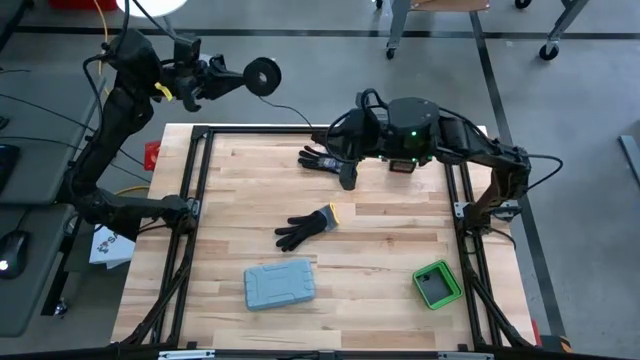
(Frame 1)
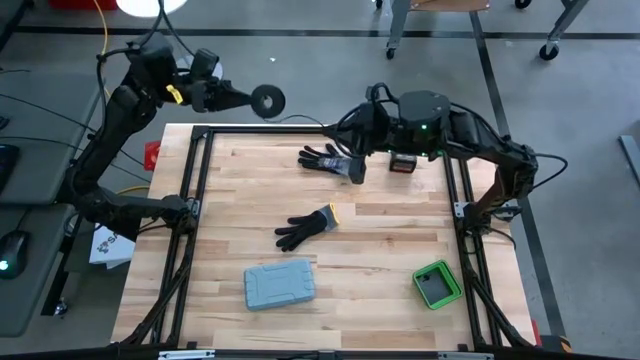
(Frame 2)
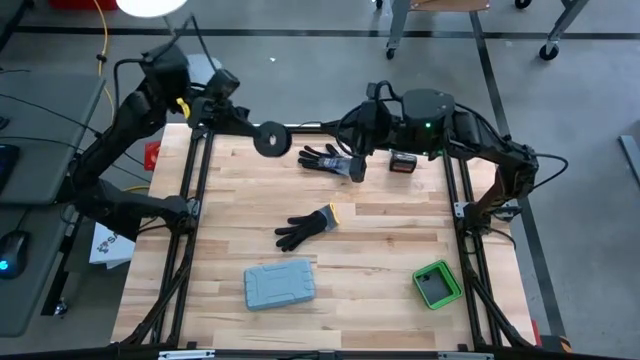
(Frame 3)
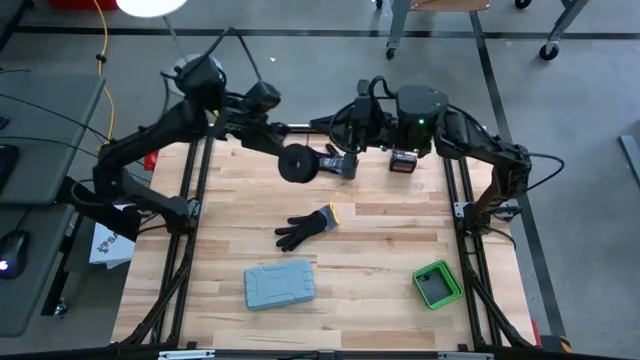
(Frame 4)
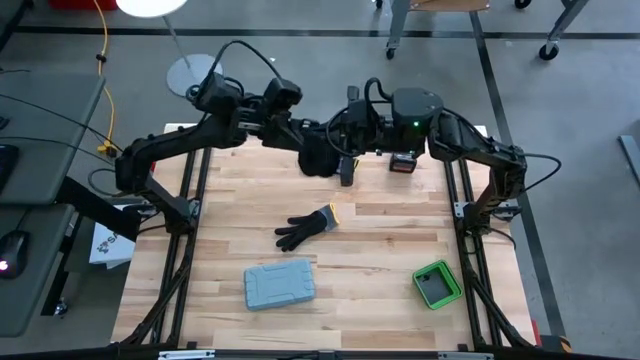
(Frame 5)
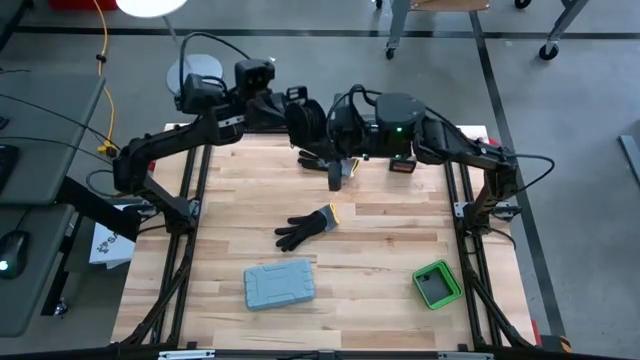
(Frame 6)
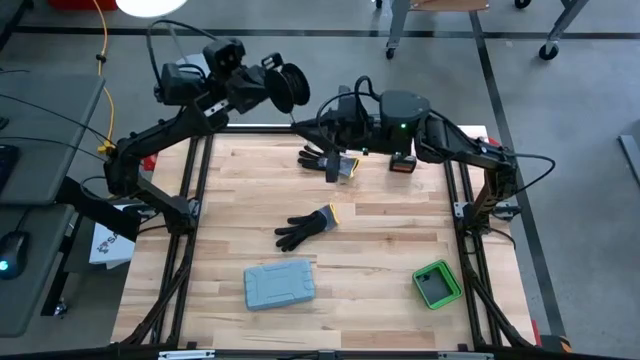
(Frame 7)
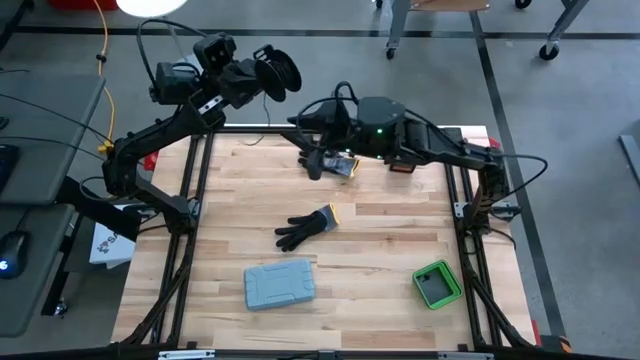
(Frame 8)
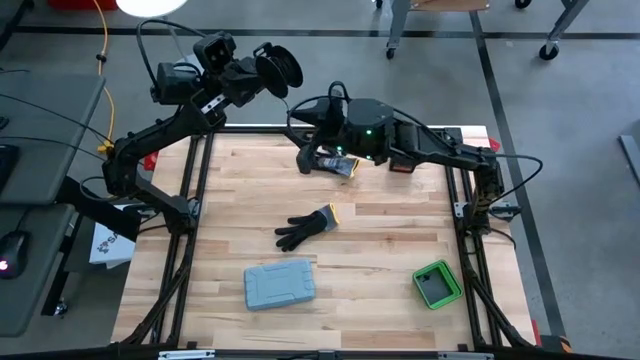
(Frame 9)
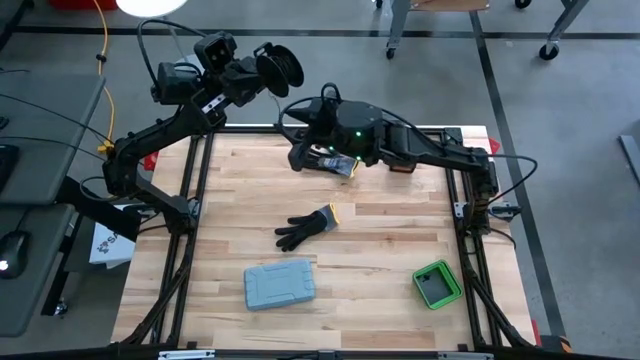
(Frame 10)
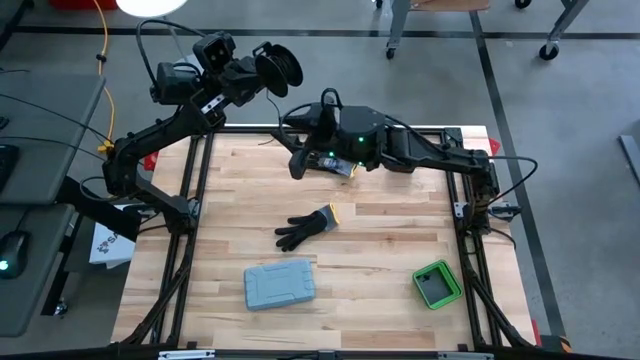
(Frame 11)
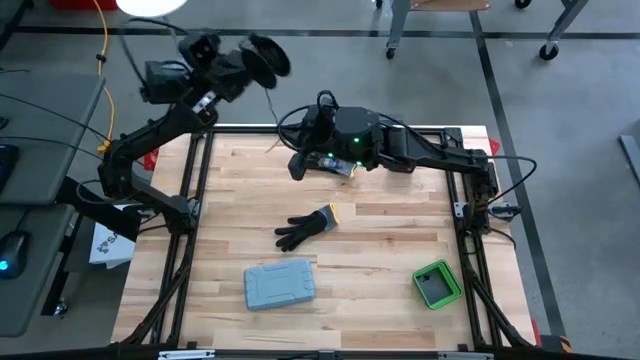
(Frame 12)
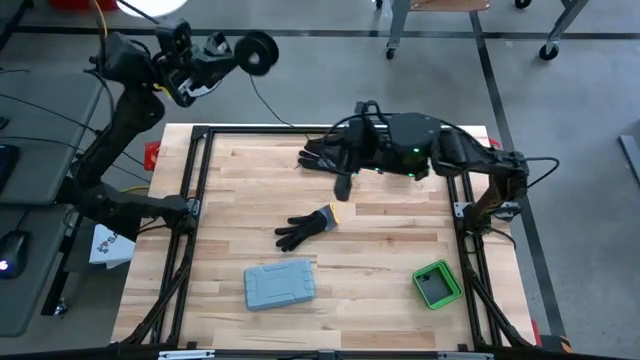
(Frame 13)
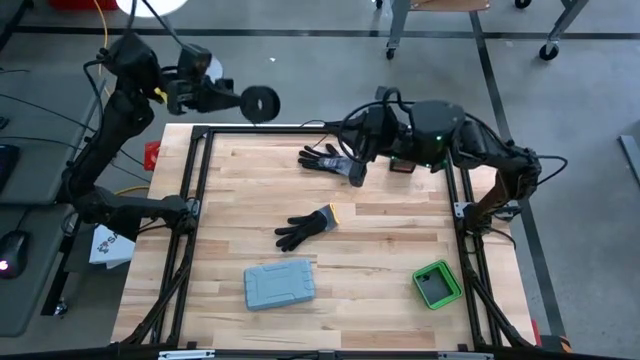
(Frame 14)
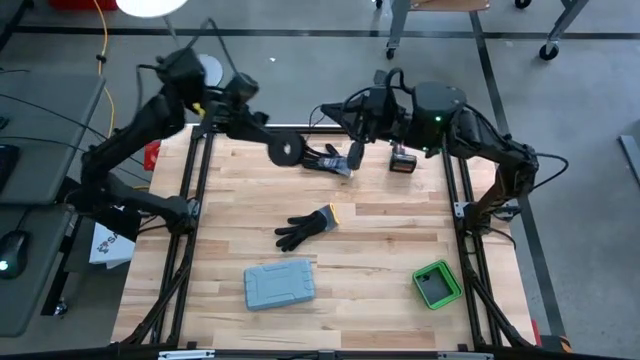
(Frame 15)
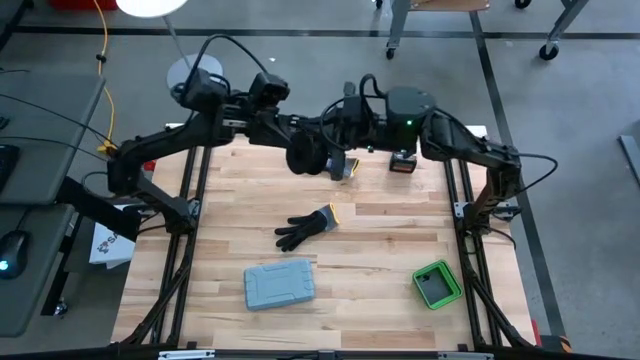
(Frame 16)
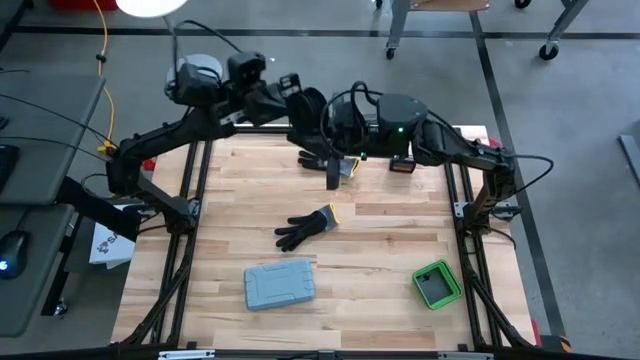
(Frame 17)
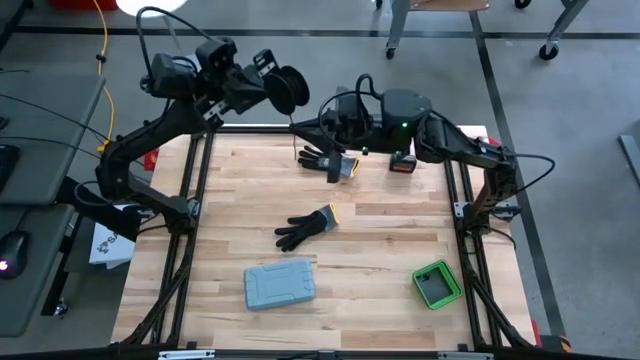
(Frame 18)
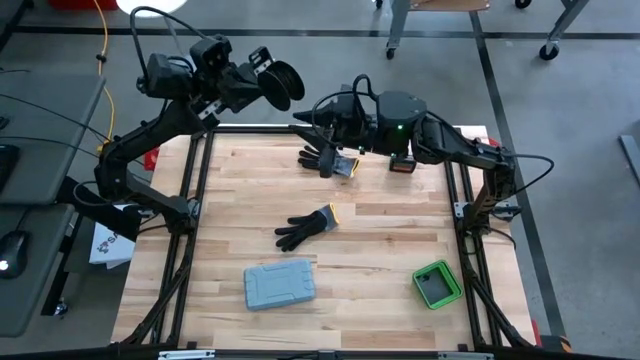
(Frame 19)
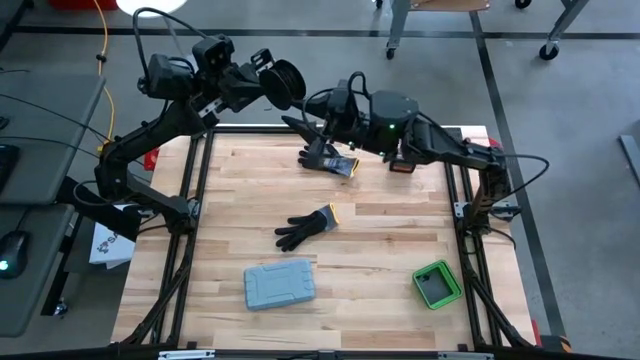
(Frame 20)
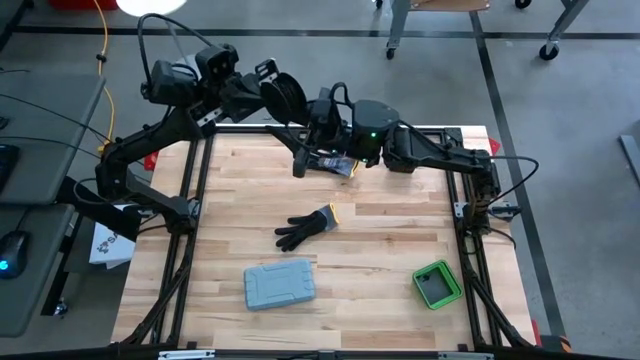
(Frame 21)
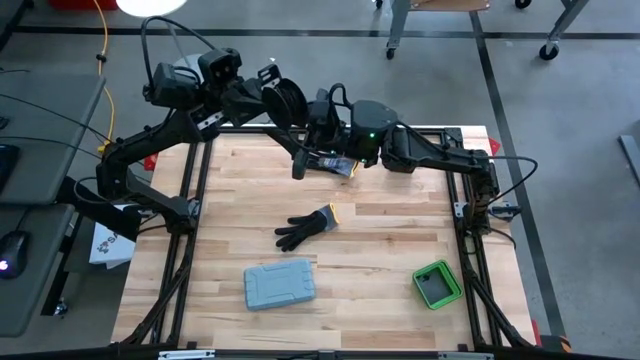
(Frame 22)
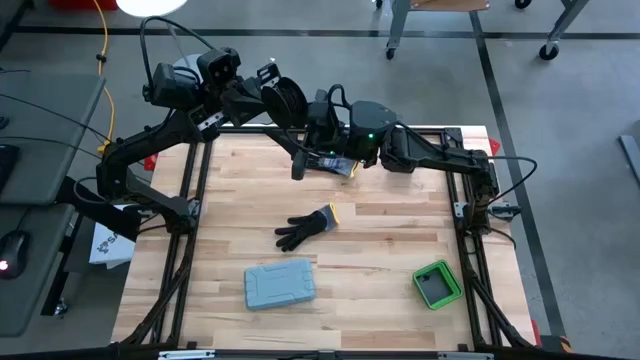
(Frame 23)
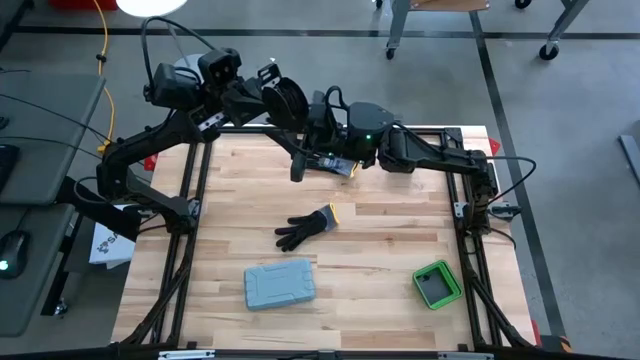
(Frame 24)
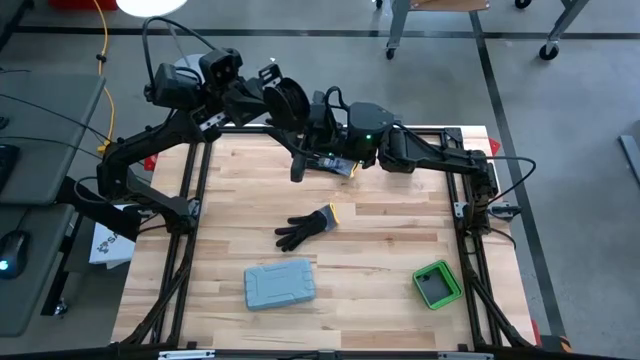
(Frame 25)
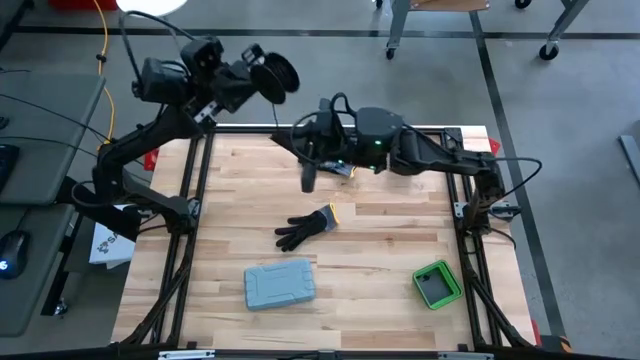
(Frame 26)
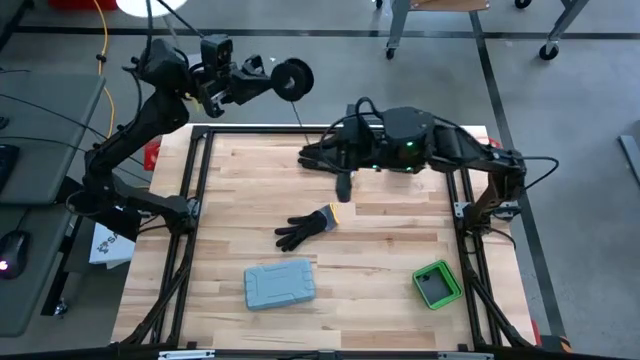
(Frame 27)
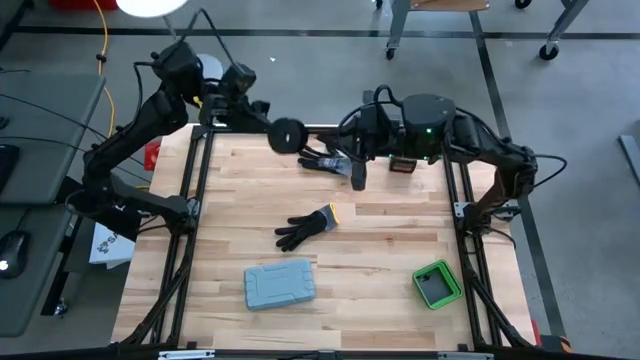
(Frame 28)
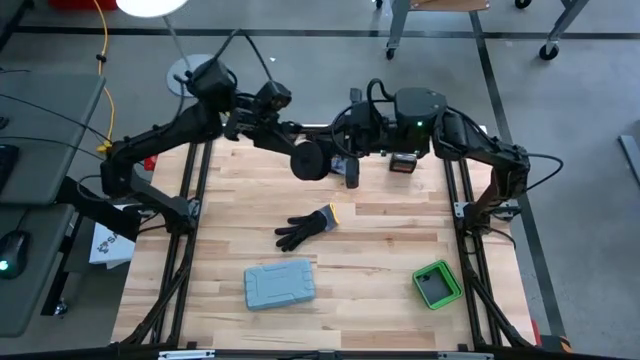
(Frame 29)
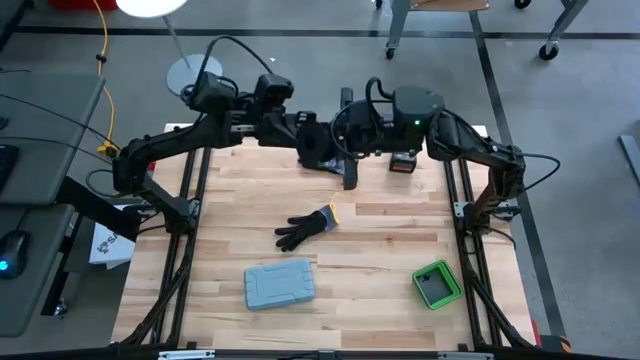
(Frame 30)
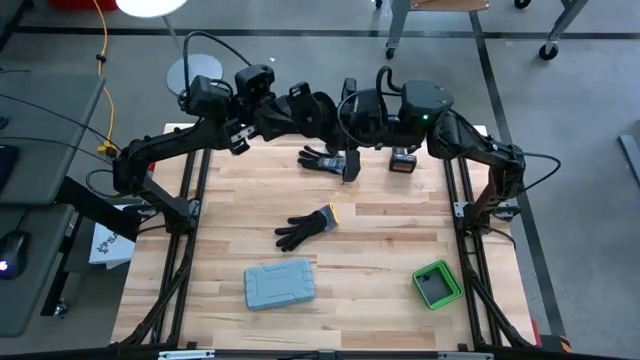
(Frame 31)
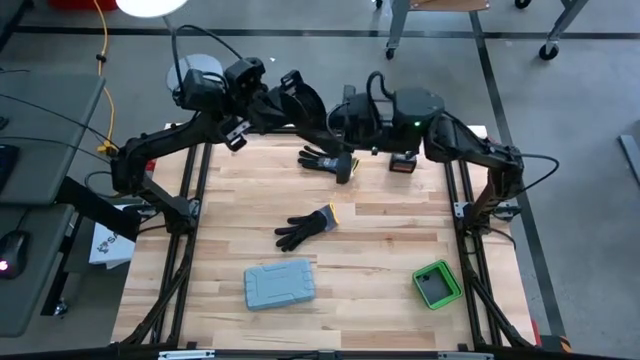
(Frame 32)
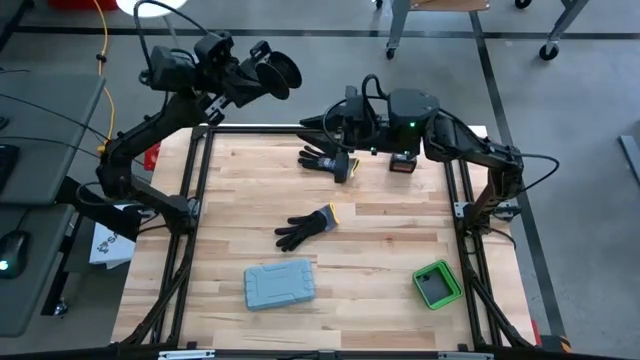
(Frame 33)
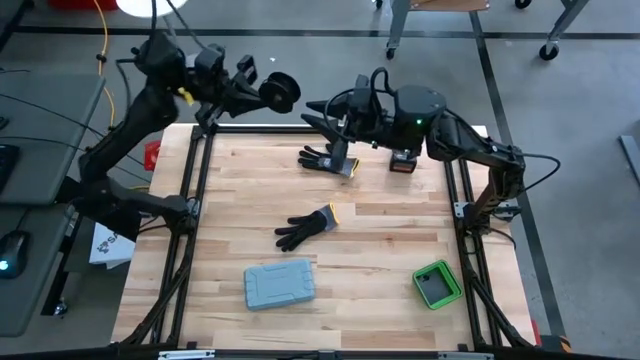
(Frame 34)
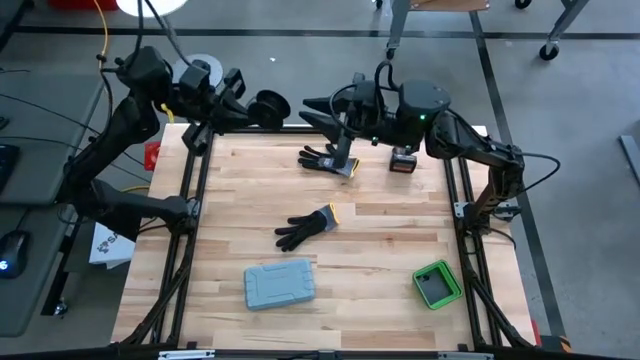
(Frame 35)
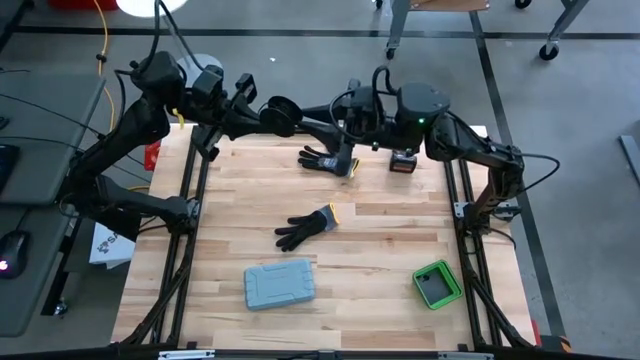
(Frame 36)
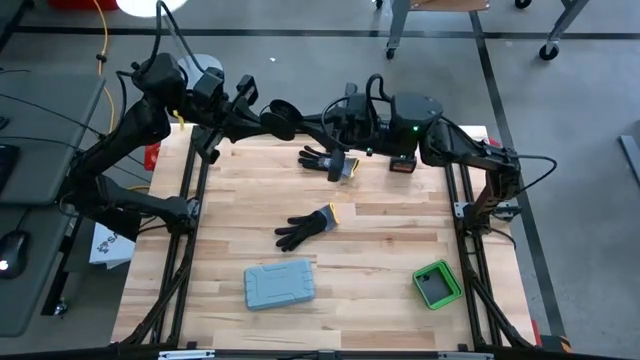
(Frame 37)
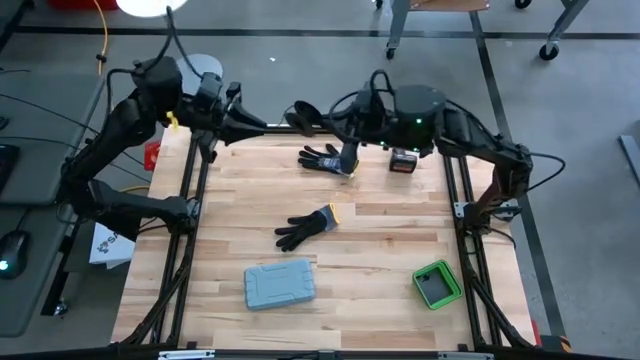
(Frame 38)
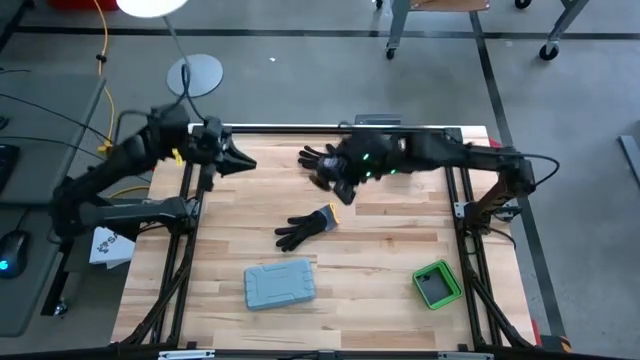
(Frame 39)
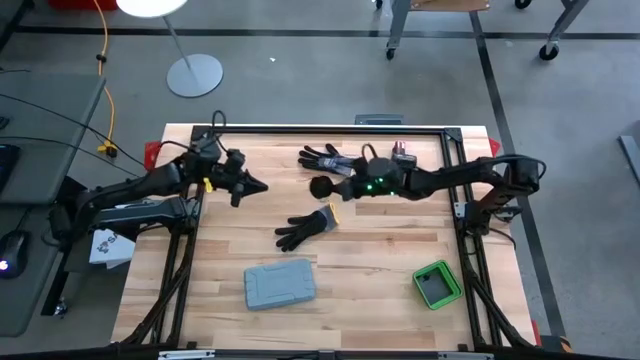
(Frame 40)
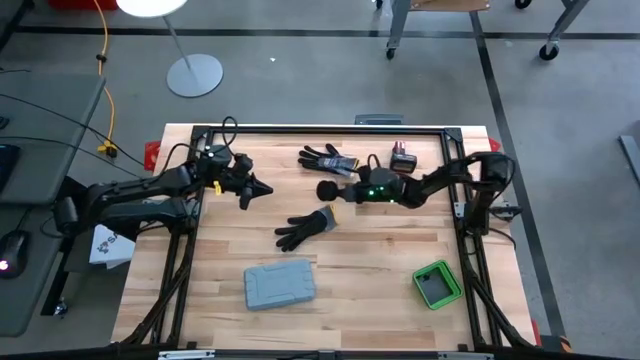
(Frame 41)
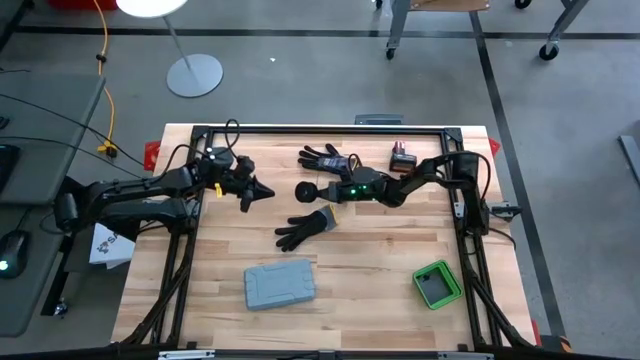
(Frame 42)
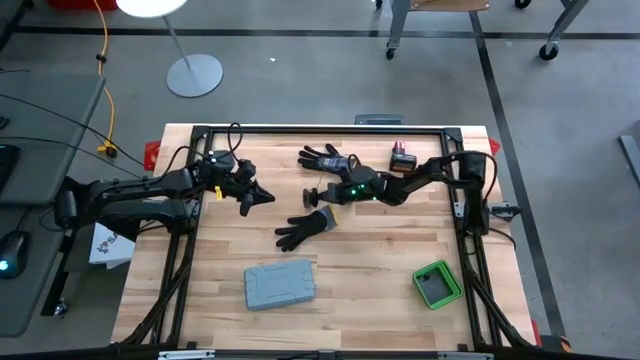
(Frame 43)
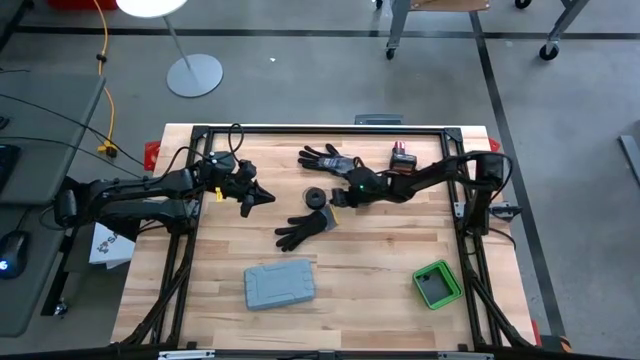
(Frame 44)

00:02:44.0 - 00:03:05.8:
Task: Coil cords
Coil the black wire cable onto the black spool
